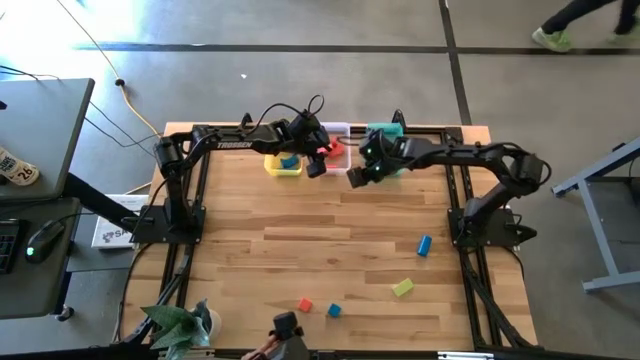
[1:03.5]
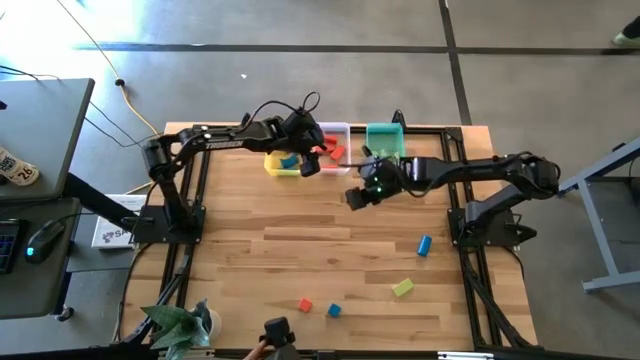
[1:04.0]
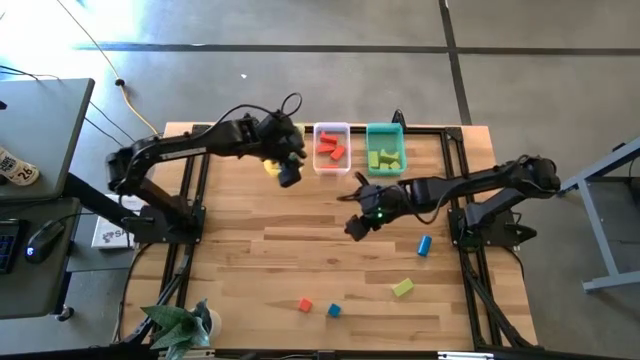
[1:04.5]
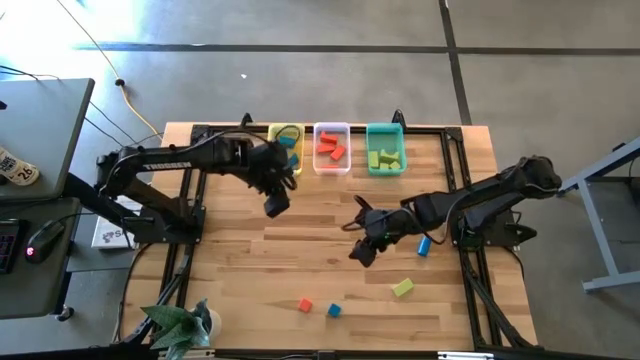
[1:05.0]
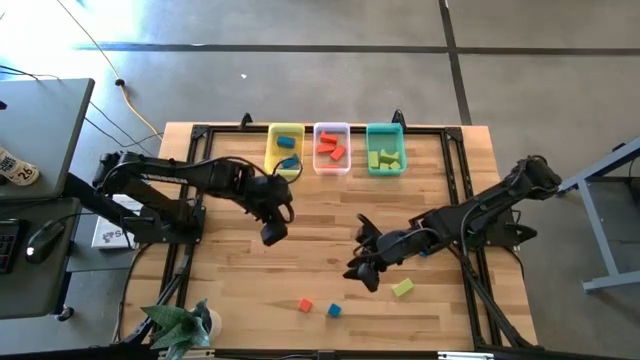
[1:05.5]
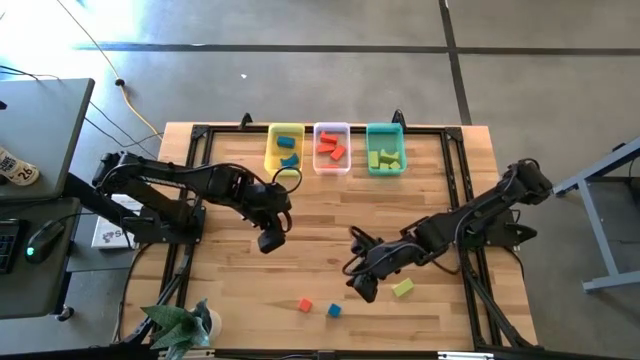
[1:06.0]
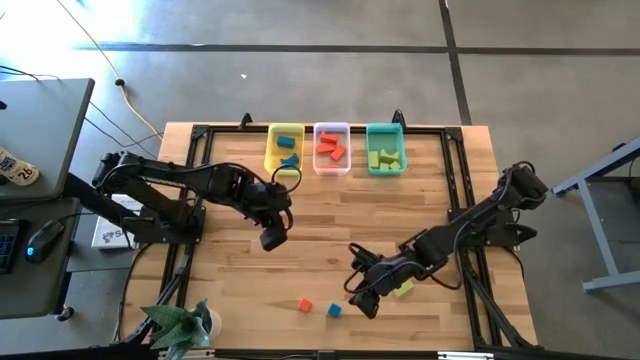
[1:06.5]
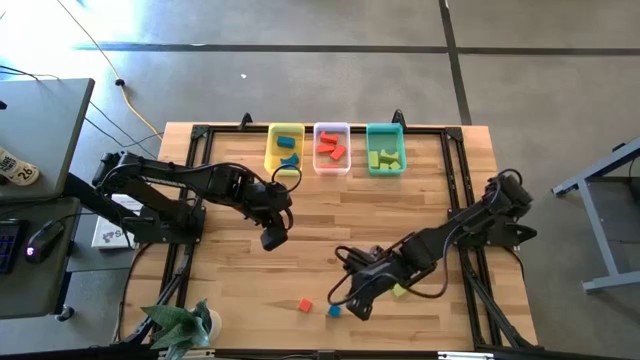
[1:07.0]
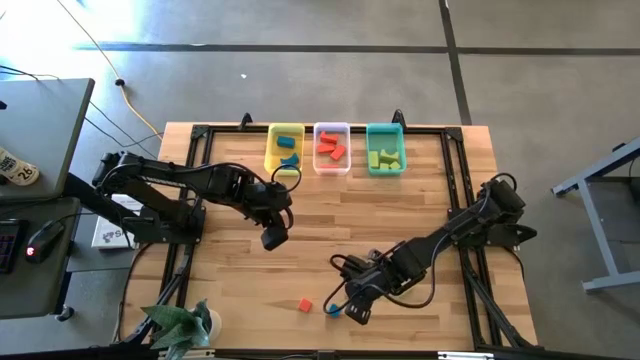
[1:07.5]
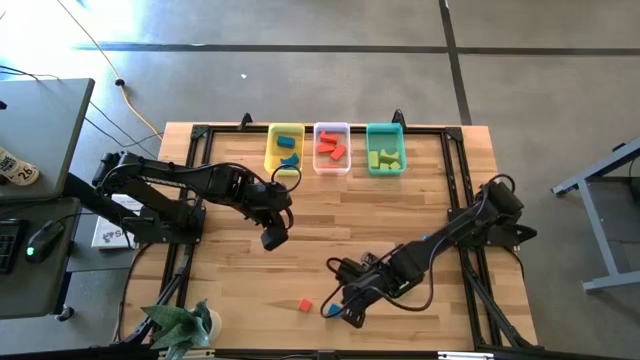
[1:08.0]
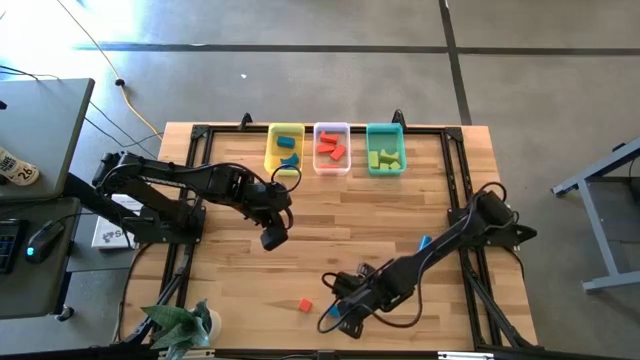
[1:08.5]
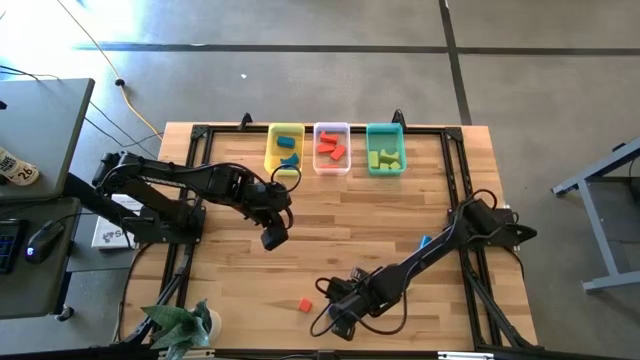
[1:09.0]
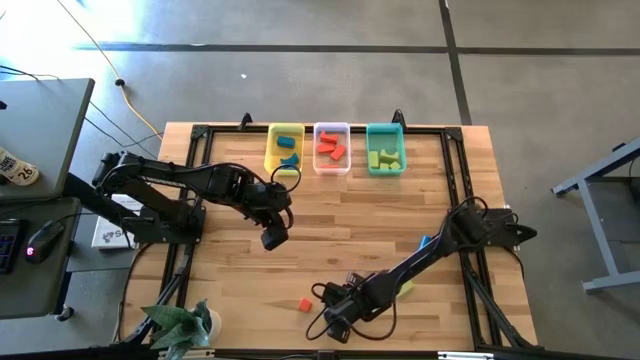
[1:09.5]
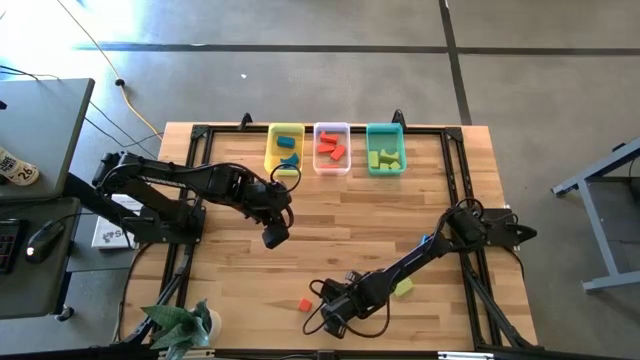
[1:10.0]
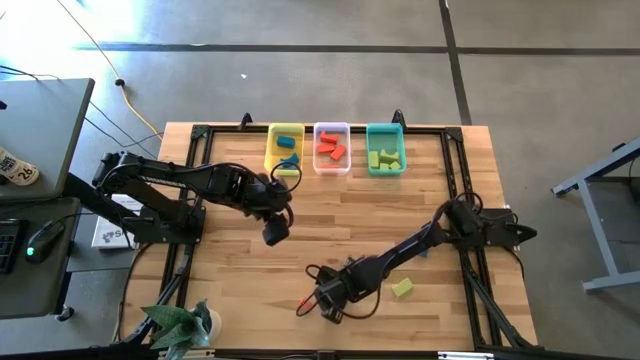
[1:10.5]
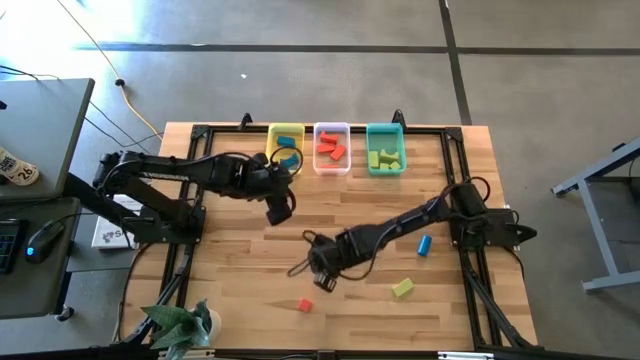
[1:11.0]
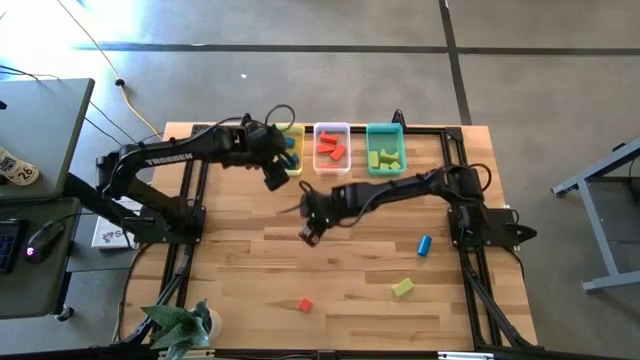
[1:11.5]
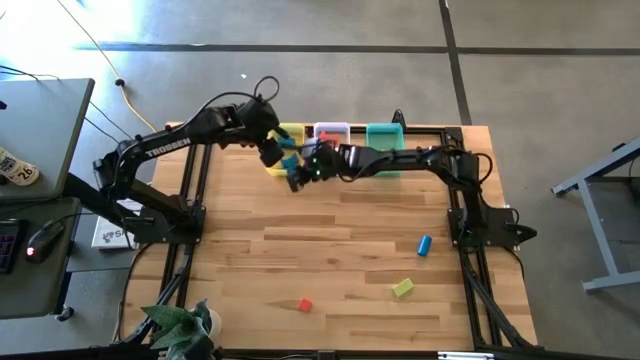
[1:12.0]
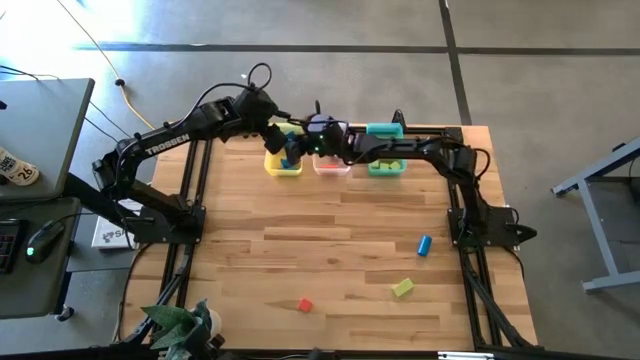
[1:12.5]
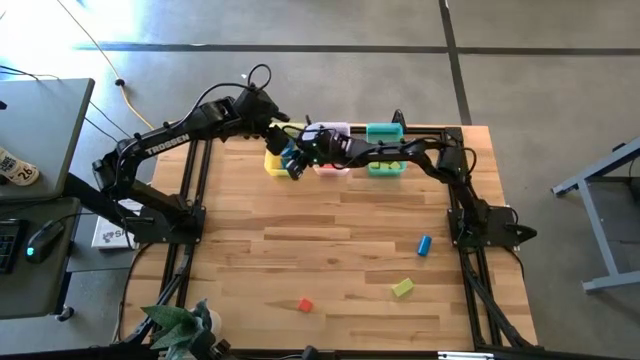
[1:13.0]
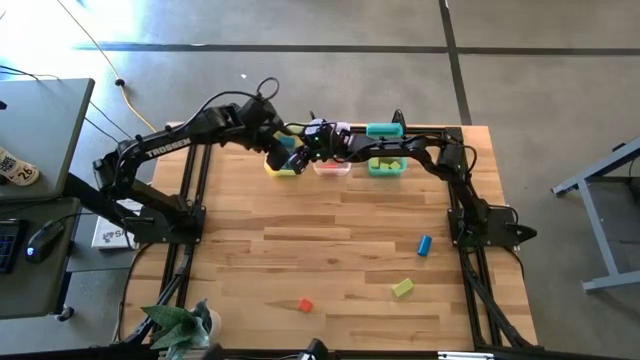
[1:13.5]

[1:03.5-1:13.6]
Task: Sort & place blocks by color
Put the blue block into the yellow bin

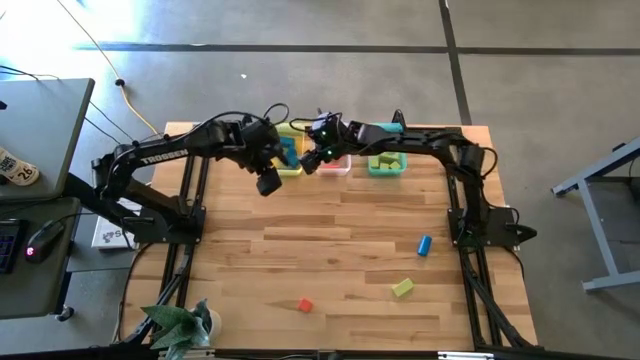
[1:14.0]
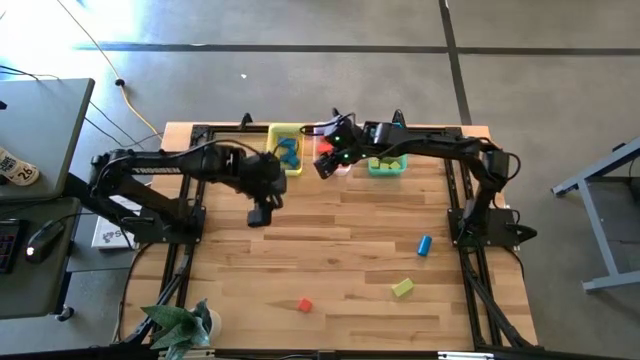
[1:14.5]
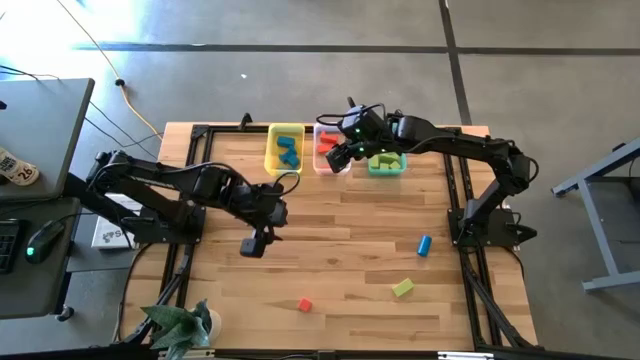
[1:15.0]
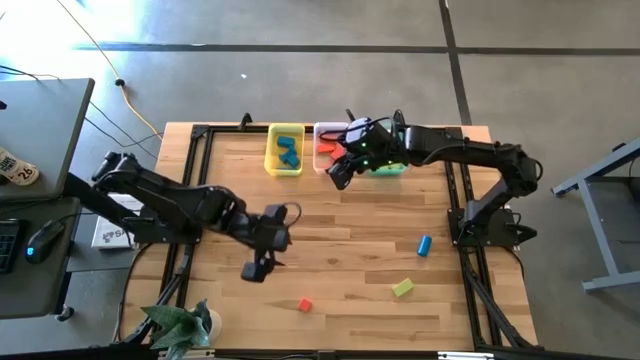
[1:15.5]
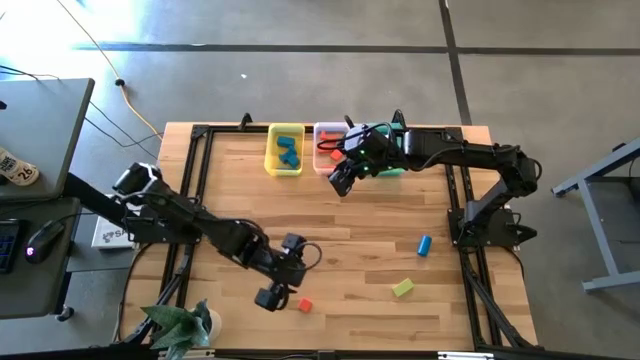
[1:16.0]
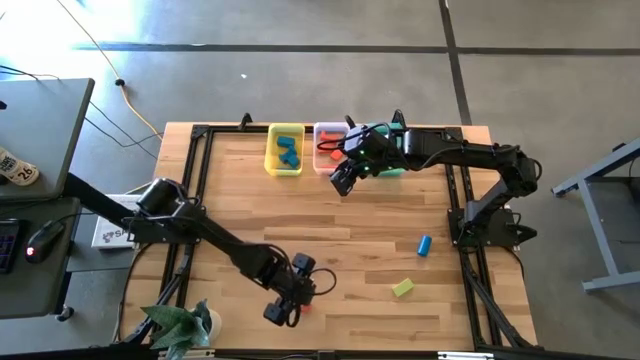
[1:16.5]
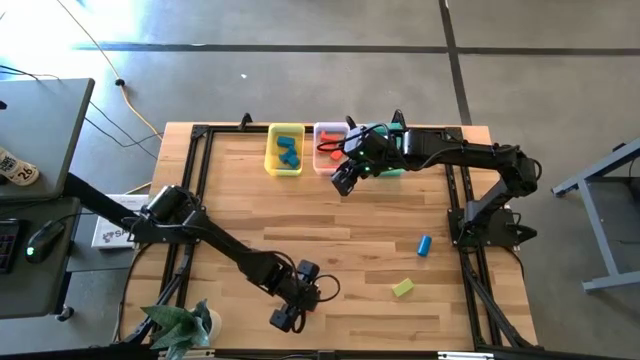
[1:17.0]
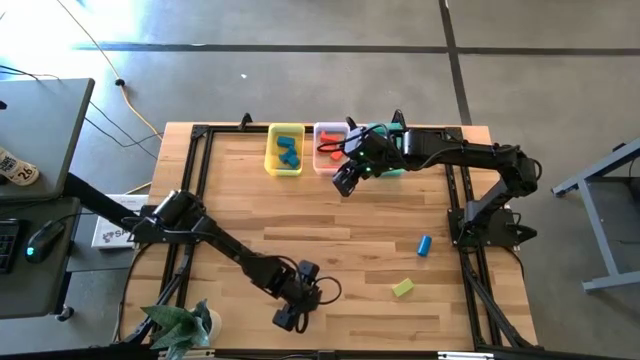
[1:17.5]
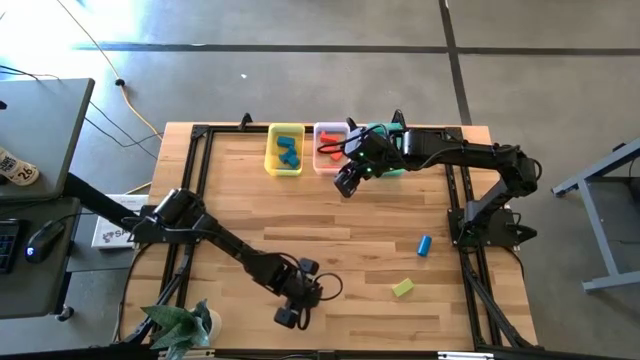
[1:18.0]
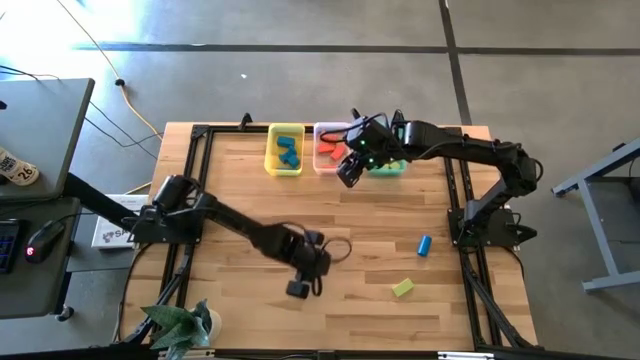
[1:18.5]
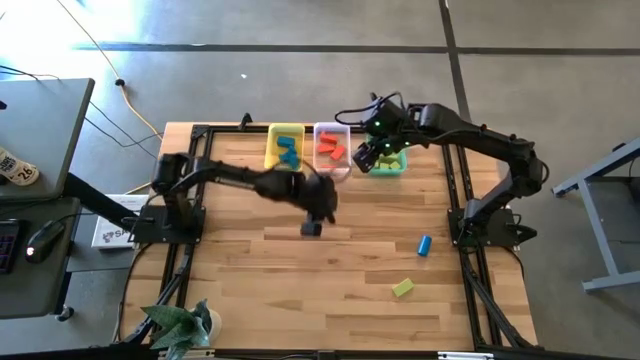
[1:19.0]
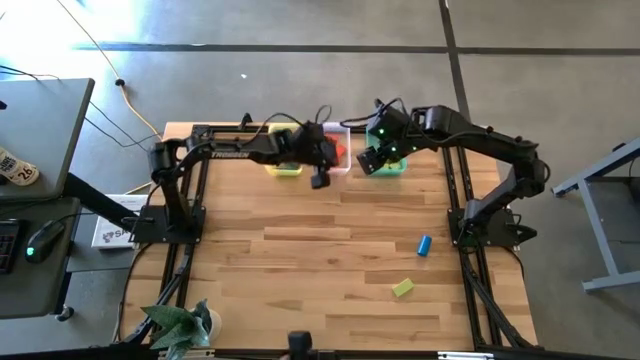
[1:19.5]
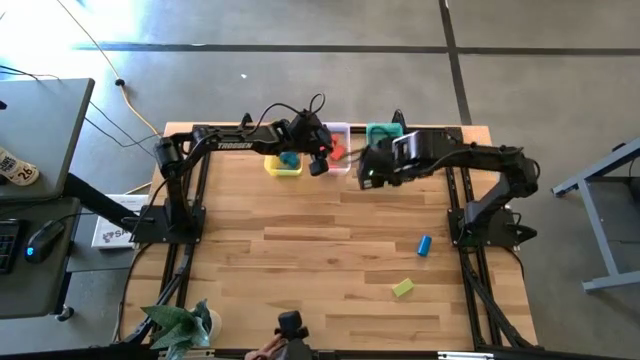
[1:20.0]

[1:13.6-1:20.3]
Put the orange block into the transparent bin

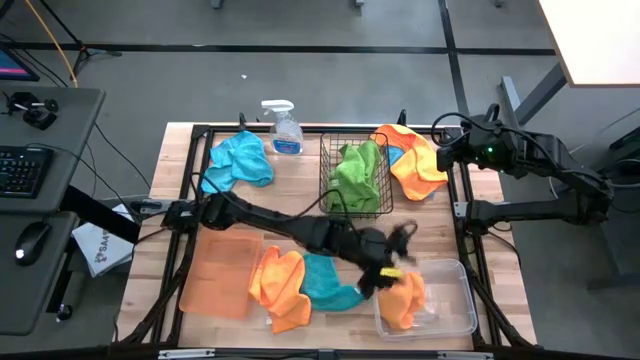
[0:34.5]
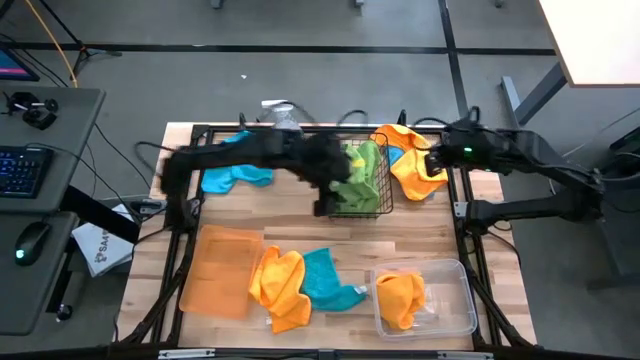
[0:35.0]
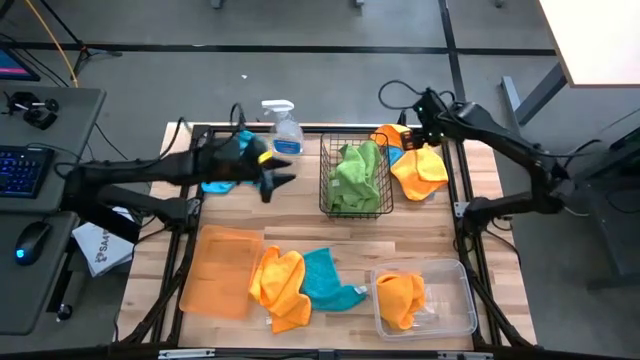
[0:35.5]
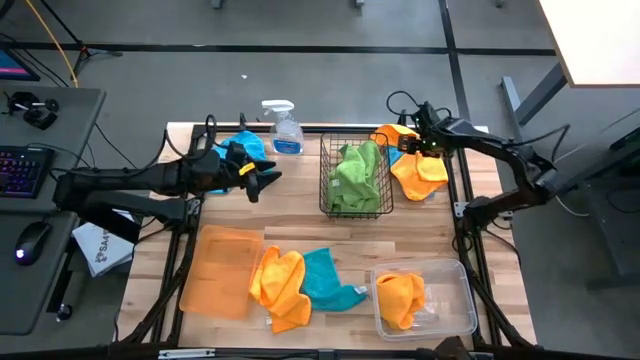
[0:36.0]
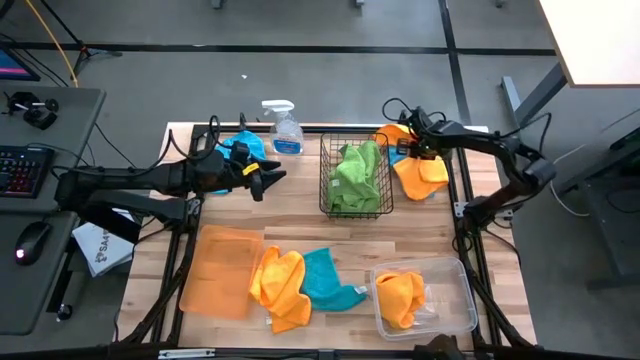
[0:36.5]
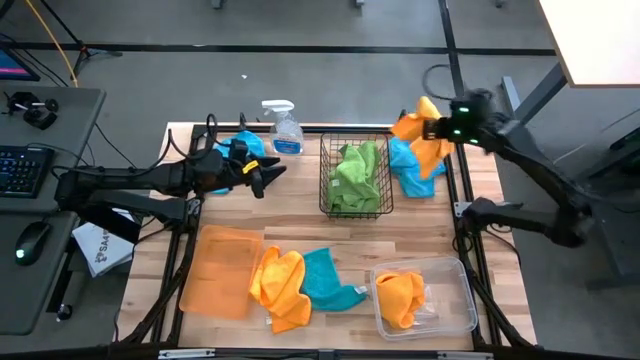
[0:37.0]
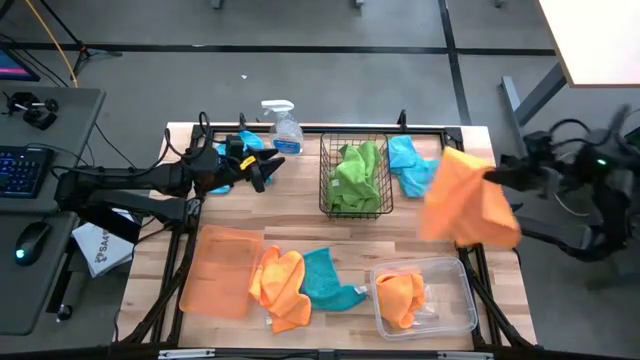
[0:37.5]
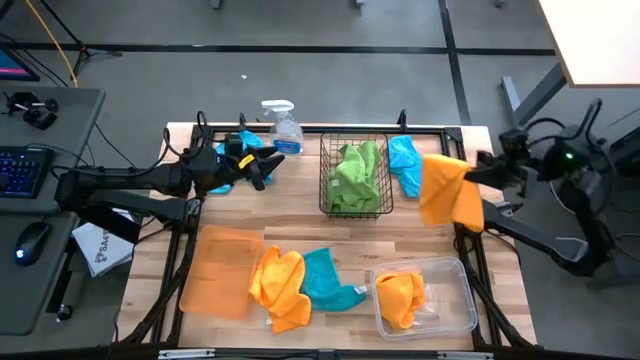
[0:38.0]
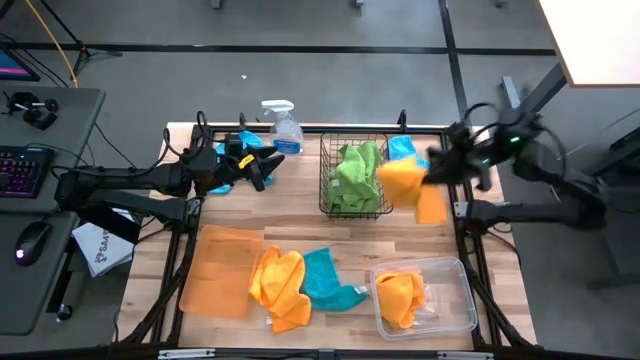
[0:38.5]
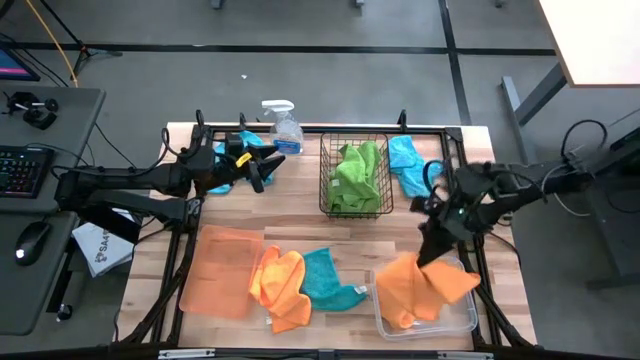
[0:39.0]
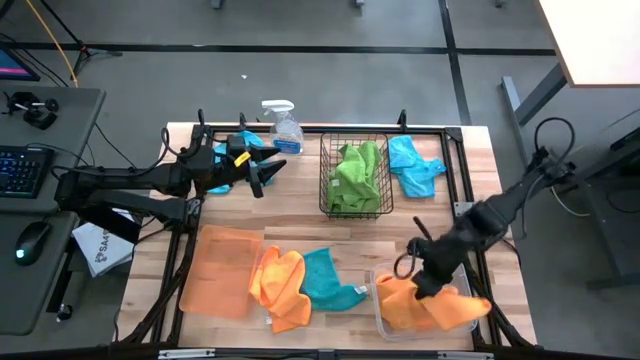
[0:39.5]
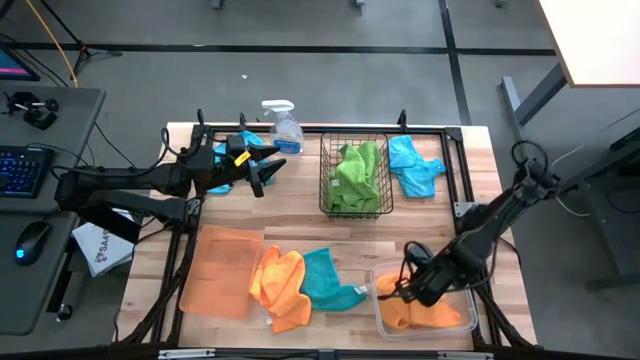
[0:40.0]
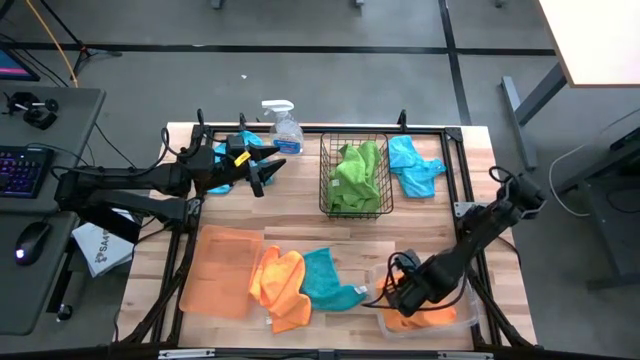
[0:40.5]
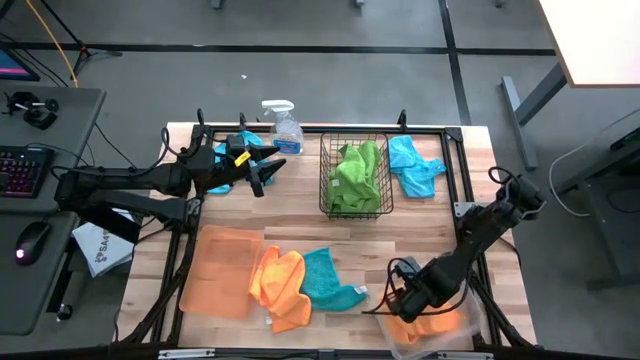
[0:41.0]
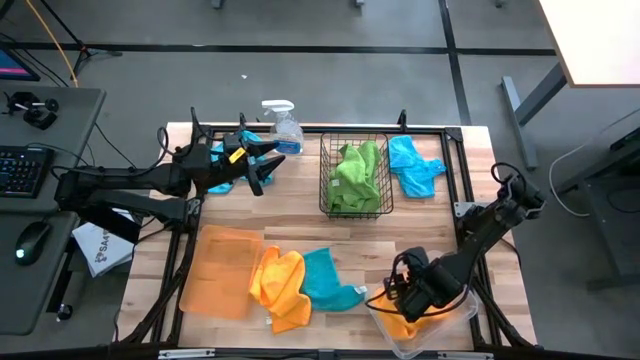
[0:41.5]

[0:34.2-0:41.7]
Task: Sort microfiber towel by color & place in baskets
Put the top orange microfiber cloth into the transparent bin
